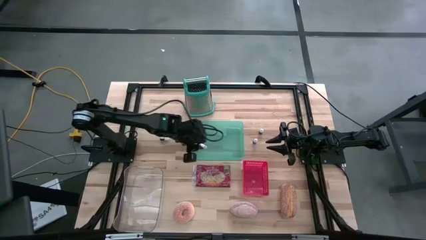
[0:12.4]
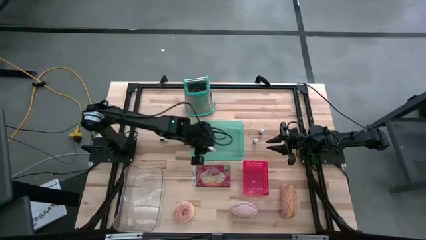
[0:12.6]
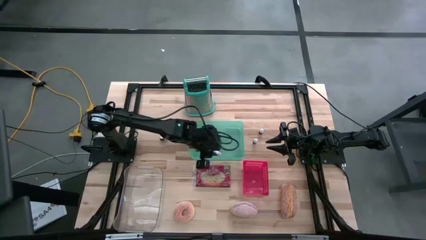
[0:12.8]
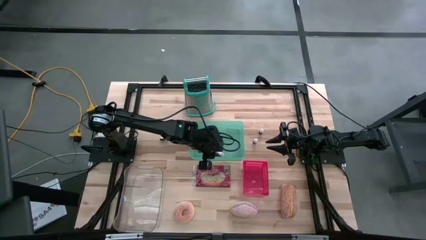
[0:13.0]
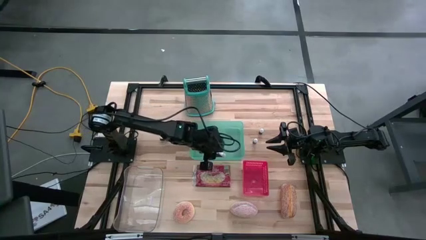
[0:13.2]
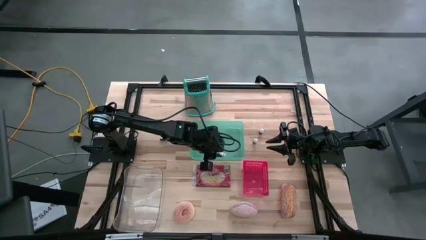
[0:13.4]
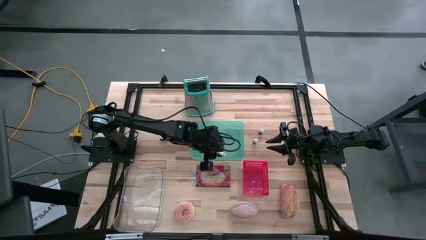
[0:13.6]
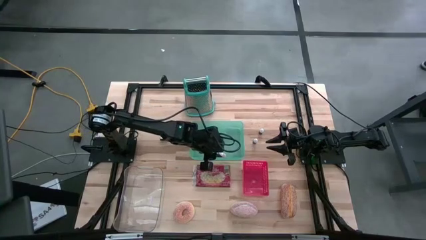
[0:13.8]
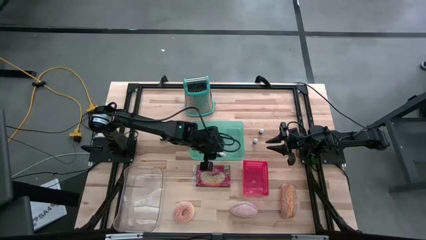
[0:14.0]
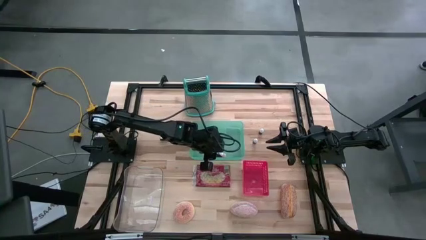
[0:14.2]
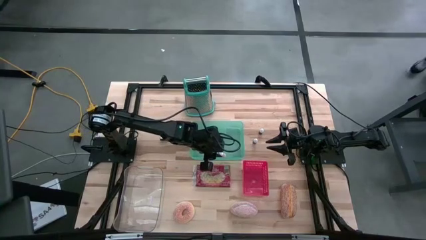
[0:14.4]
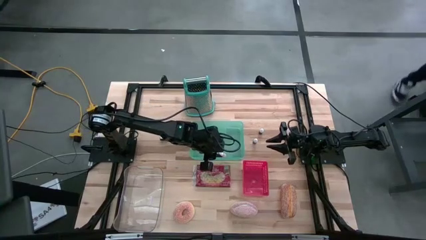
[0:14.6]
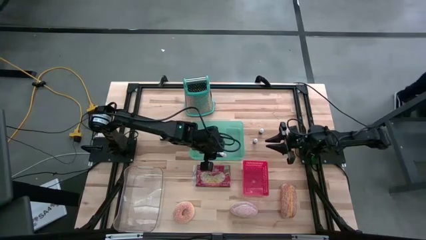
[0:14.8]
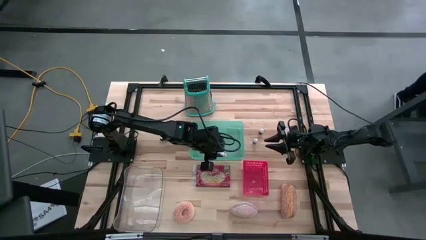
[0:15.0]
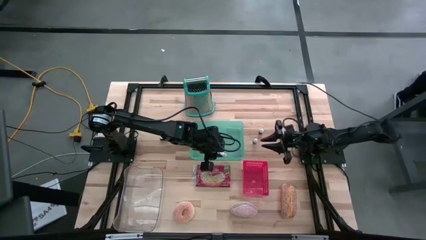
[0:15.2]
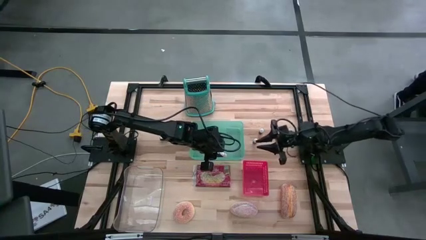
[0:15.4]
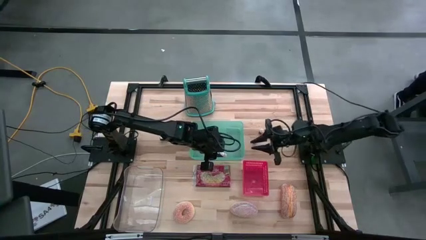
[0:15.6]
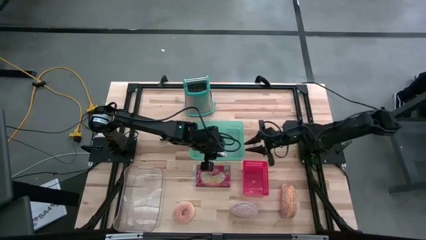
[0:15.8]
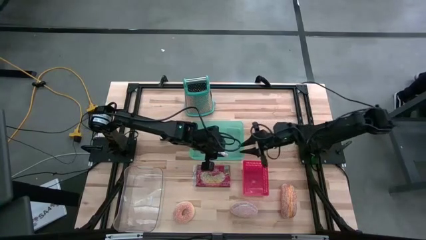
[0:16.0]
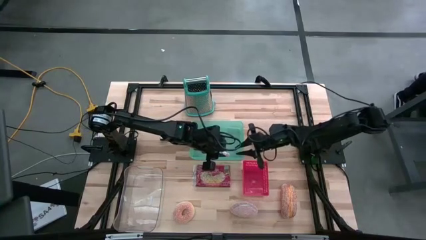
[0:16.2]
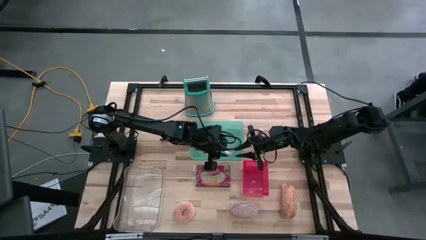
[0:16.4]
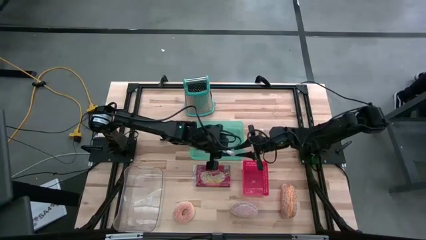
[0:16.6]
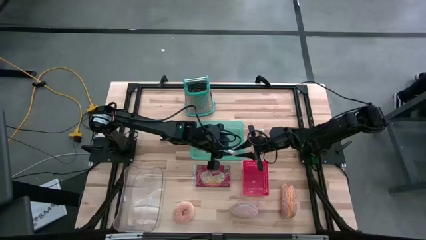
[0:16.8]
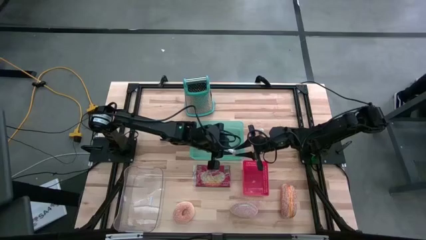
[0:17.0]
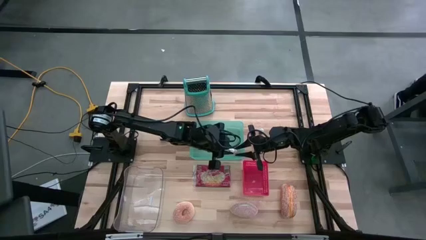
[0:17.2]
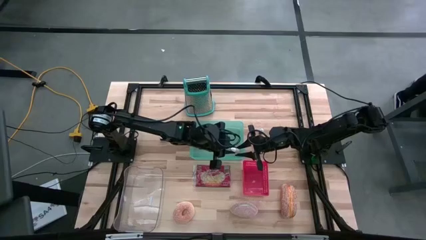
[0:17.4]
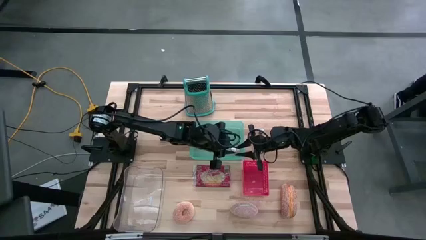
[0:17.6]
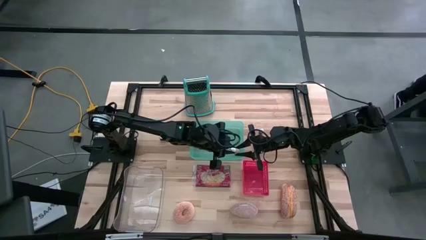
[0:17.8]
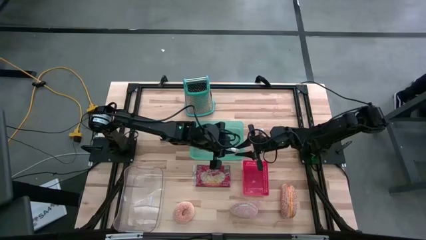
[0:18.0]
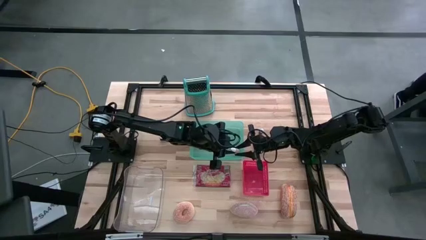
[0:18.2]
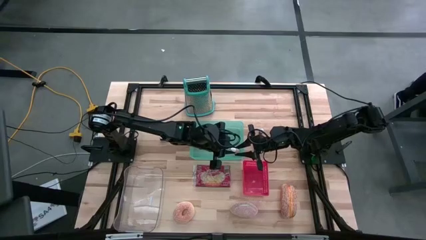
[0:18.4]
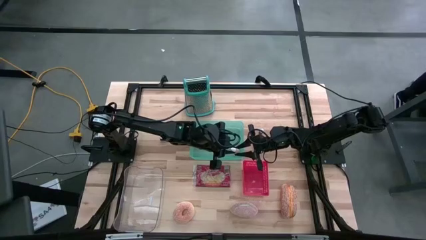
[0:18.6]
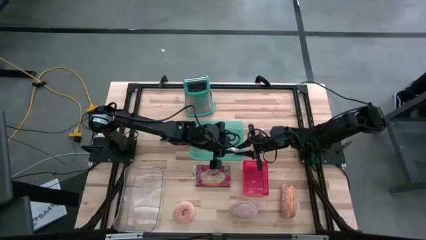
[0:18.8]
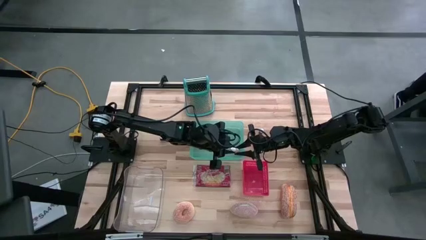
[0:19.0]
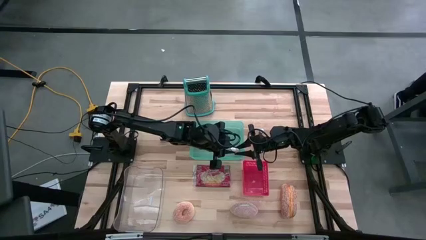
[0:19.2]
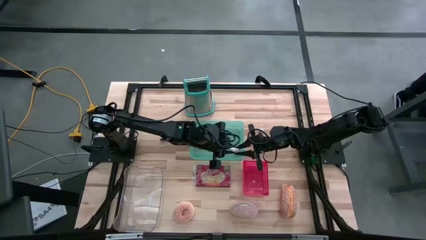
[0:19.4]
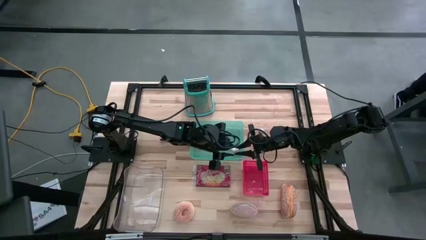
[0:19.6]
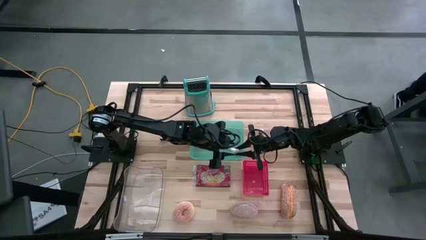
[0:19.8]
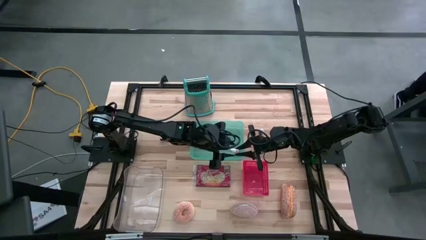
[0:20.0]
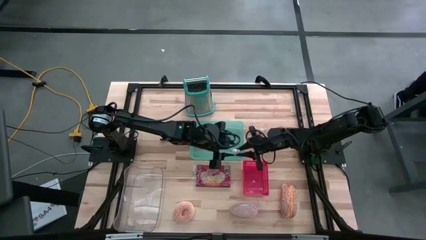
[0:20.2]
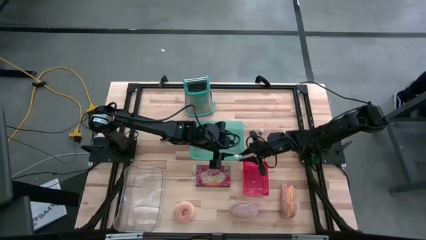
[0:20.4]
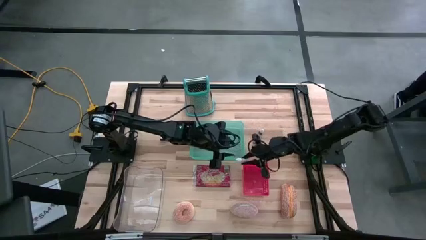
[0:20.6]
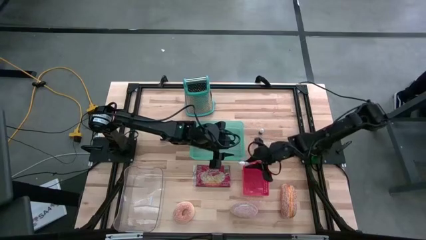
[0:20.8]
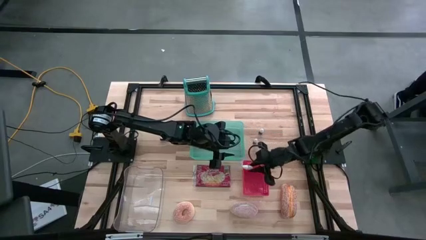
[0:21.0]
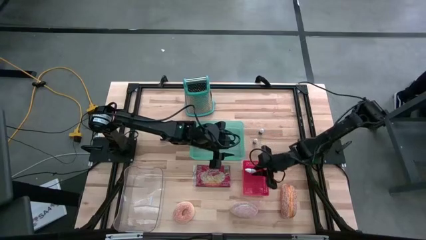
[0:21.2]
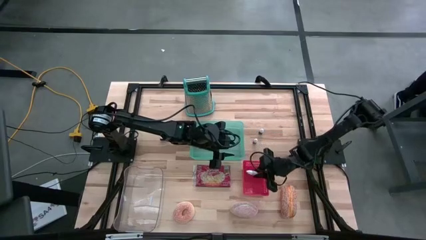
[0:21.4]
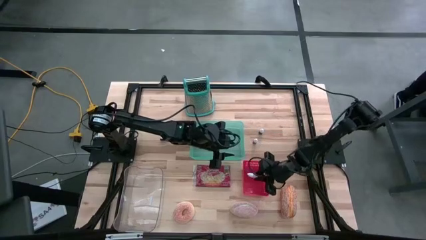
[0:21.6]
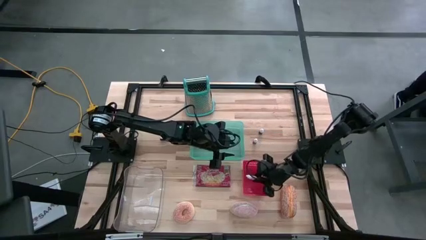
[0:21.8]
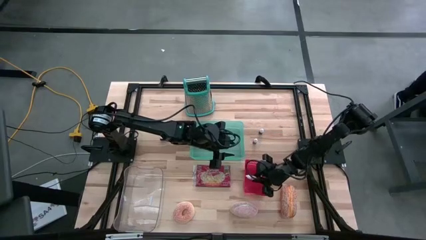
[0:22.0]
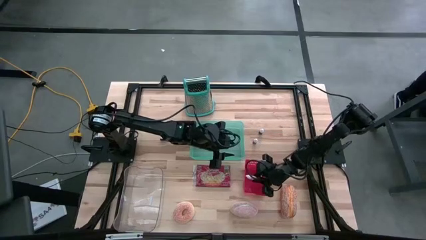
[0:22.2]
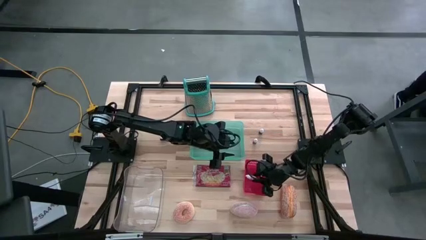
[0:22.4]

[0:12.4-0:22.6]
Task: Pick & Place Food Item
Put the orange food coloring bottle into the red bin

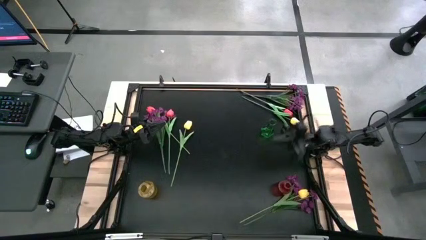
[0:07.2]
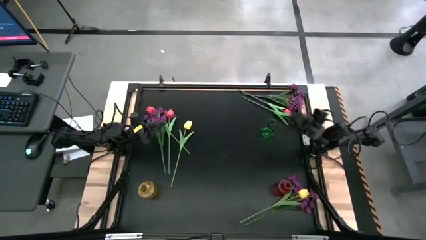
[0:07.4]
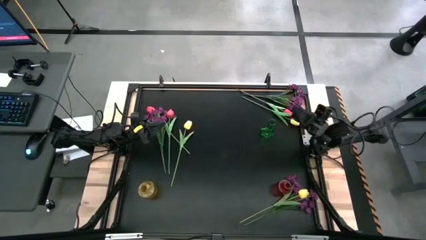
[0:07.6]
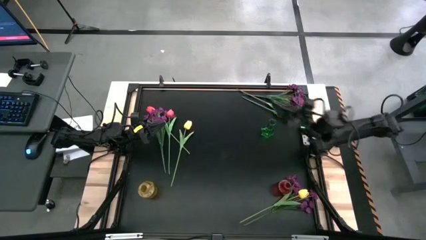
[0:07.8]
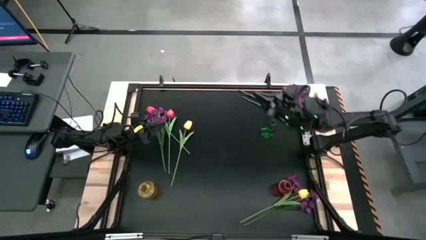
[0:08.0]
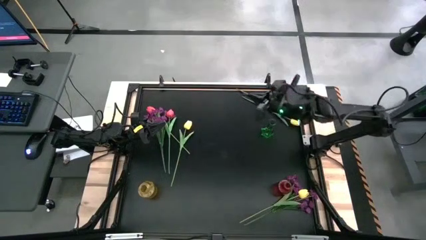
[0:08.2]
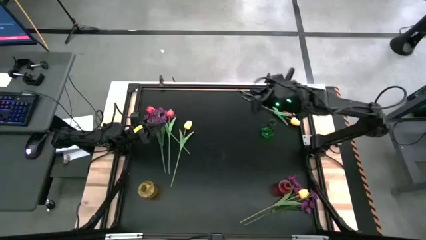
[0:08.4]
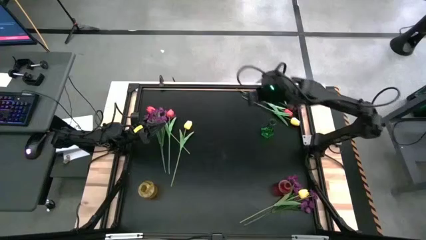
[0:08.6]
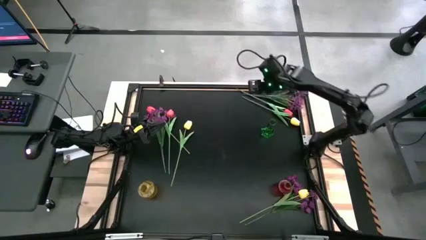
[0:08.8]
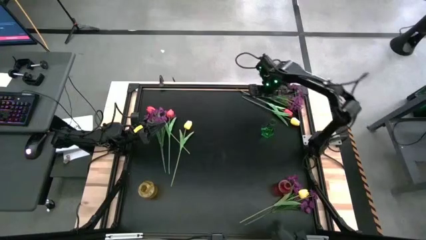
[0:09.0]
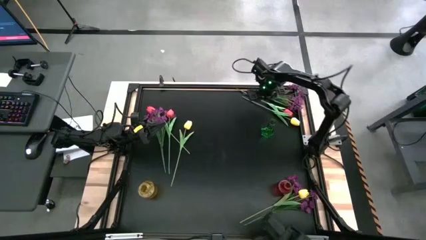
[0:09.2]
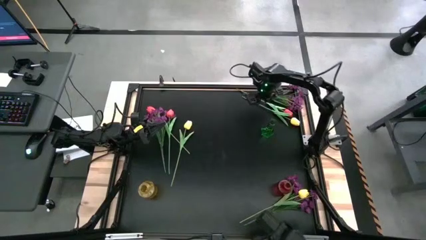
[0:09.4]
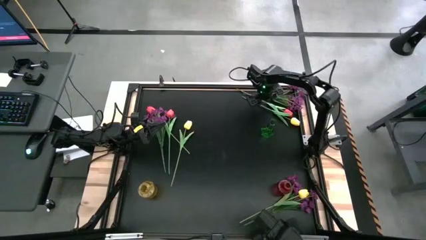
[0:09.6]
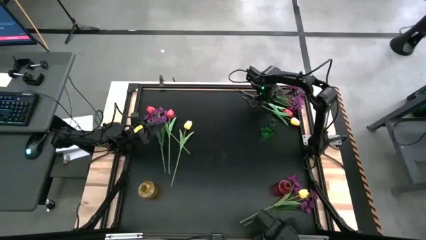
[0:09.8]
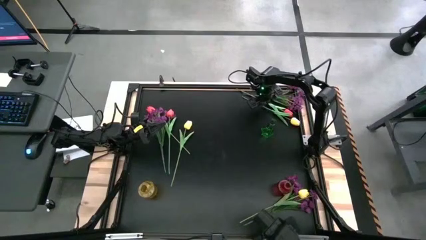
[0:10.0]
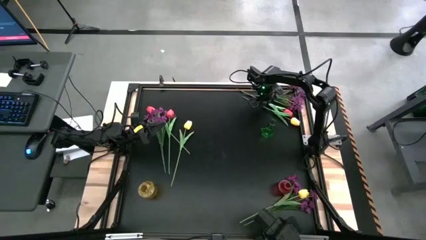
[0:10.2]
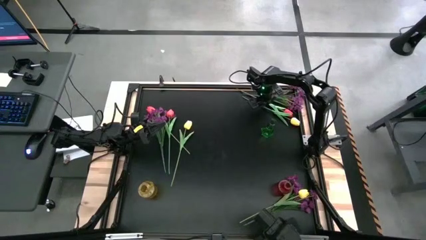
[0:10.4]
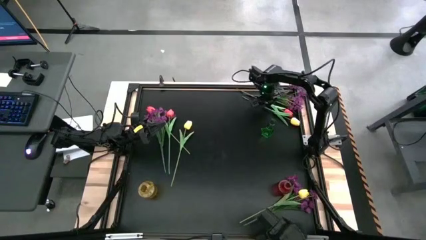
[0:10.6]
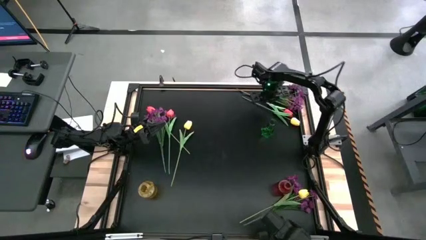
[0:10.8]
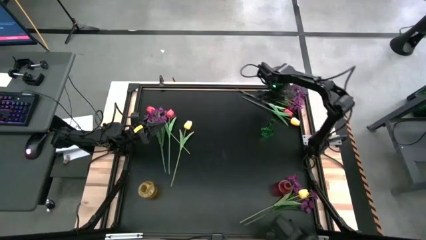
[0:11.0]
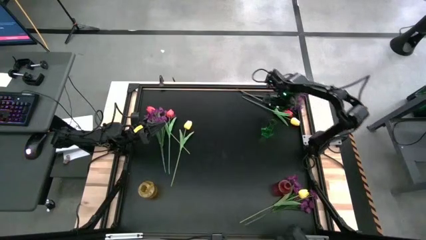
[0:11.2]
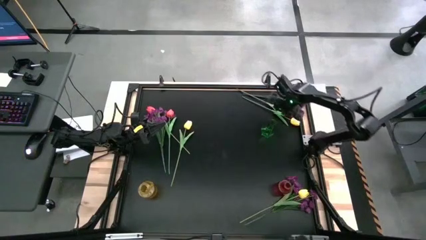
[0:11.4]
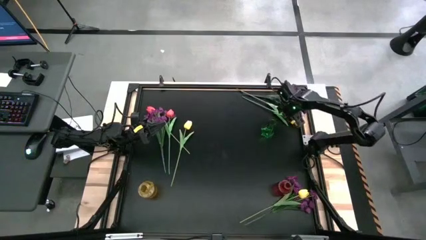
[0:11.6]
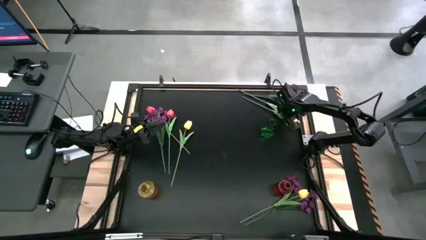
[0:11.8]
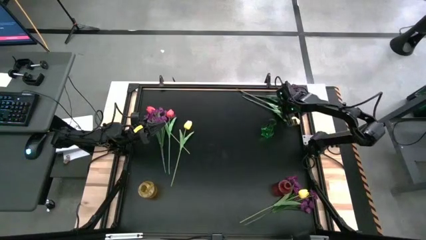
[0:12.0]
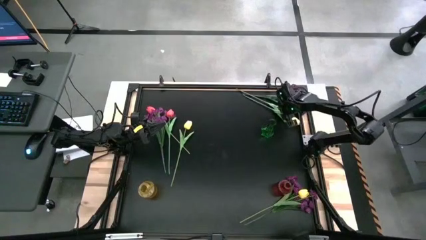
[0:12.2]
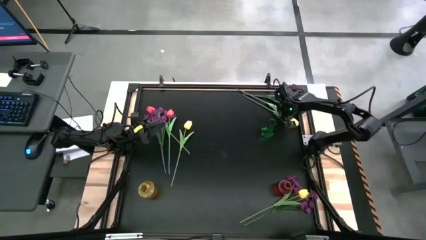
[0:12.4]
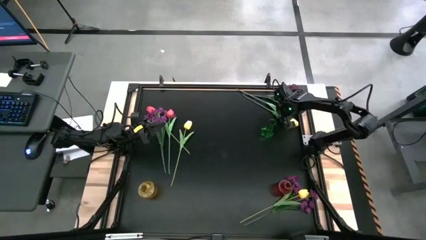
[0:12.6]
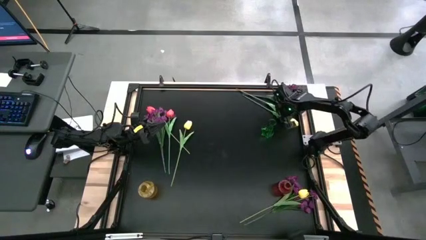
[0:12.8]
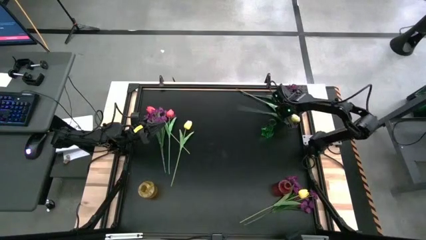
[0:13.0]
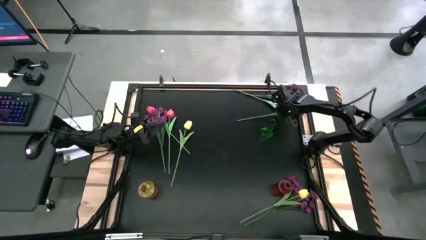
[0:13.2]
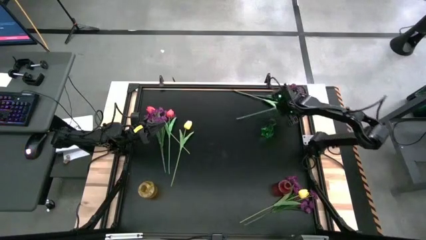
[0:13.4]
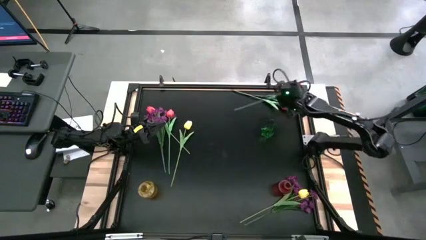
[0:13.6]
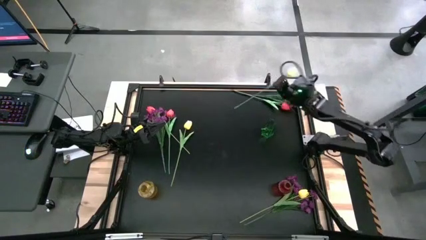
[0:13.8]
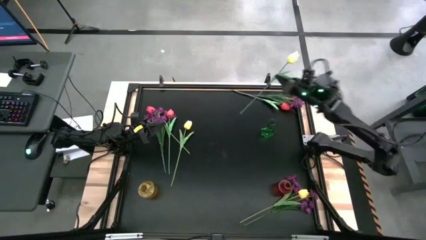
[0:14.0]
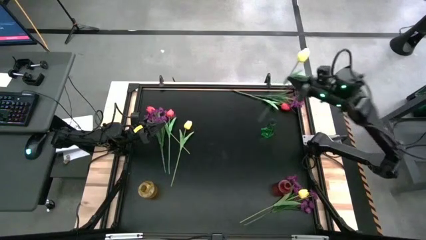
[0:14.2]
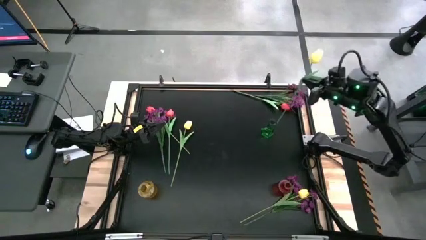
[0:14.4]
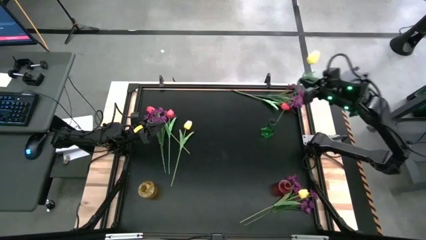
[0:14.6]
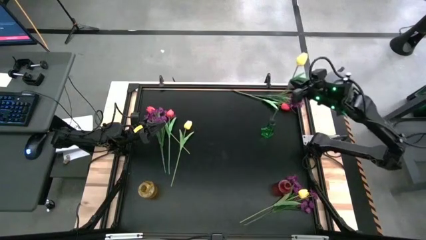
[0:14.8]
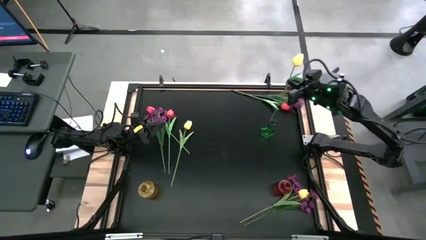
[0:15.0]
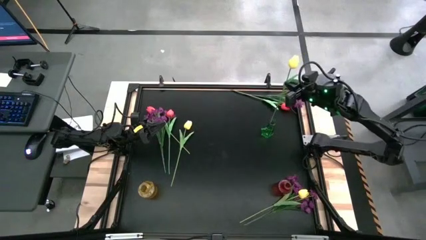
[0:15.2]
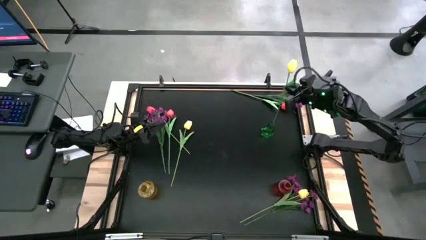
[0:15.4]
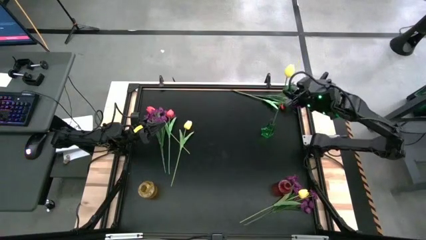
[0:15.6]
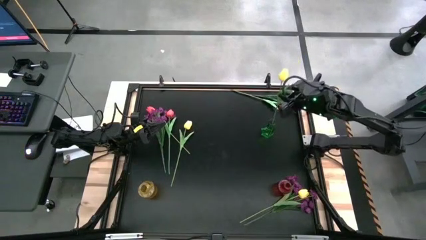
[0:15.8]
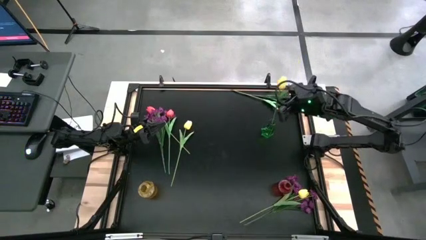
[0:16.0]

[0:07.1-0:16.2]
Task: Sort flowers into vase by color
Put the top yellow tulip into the green flower vase
